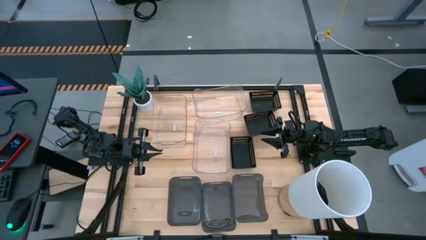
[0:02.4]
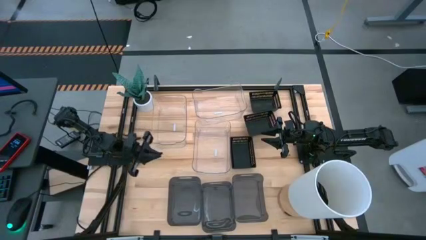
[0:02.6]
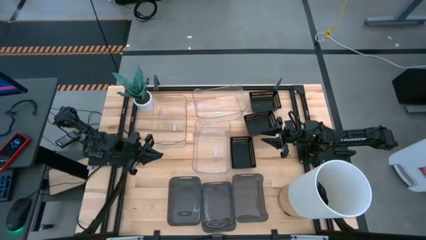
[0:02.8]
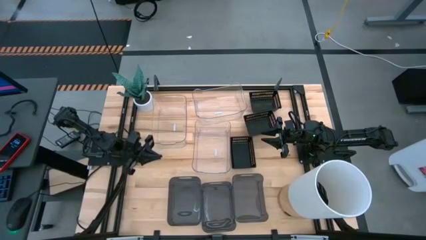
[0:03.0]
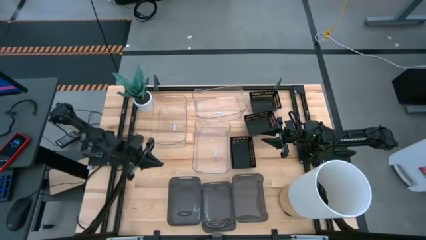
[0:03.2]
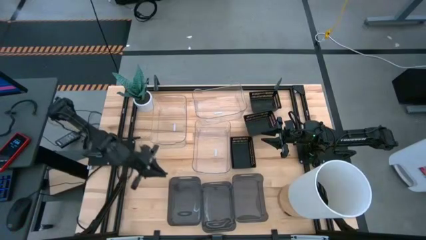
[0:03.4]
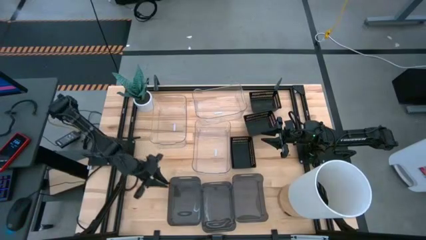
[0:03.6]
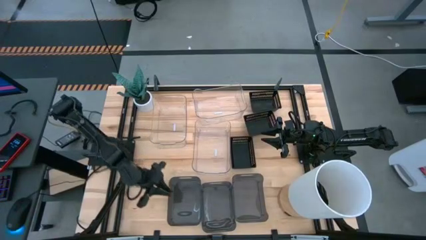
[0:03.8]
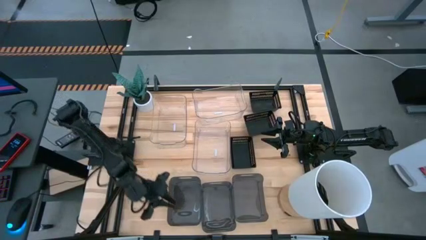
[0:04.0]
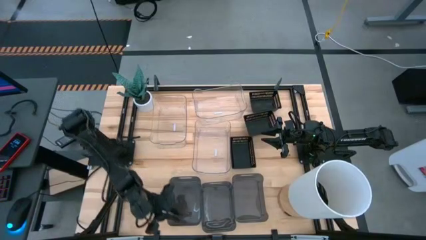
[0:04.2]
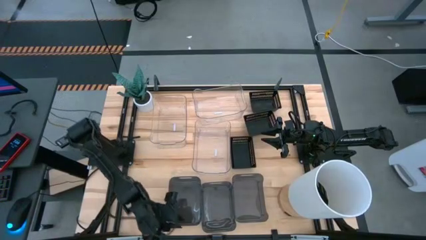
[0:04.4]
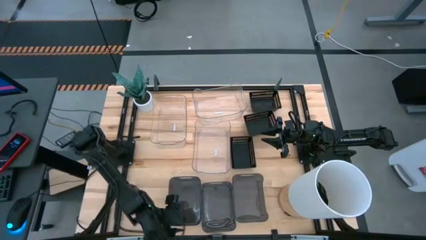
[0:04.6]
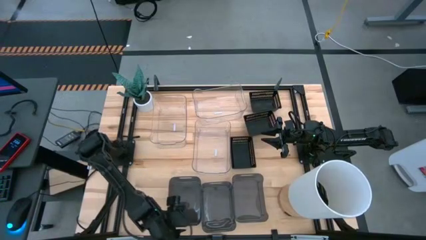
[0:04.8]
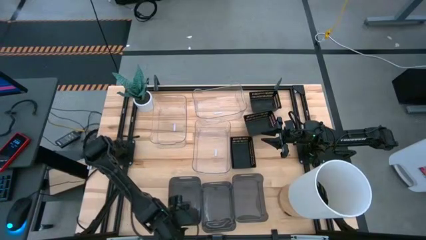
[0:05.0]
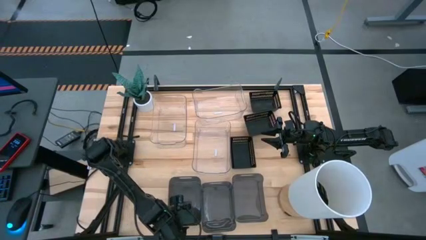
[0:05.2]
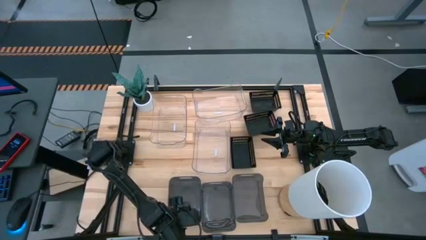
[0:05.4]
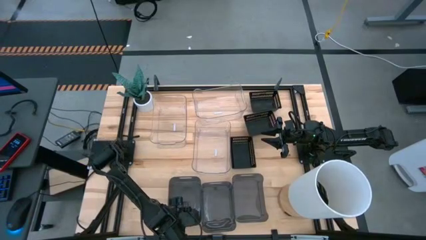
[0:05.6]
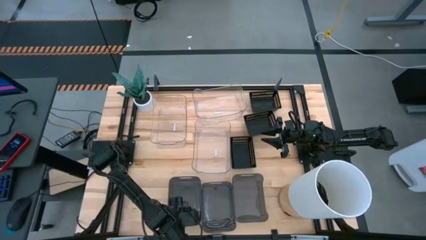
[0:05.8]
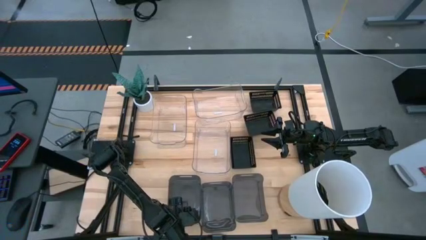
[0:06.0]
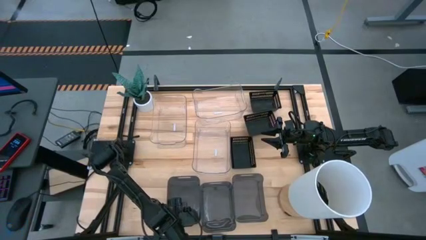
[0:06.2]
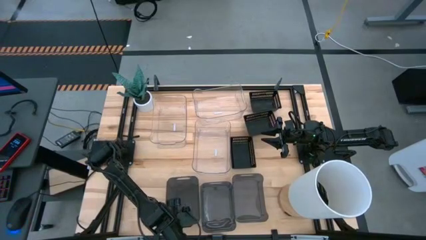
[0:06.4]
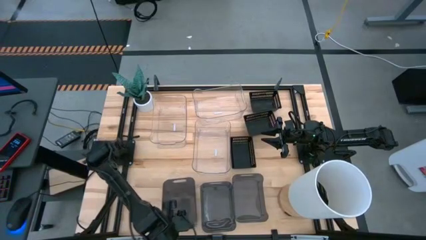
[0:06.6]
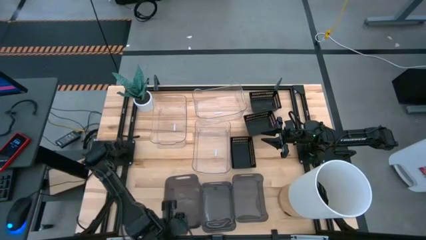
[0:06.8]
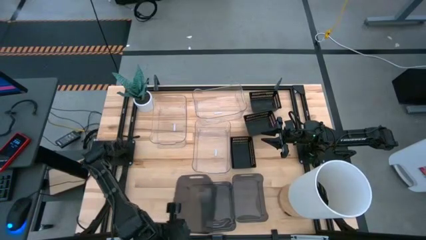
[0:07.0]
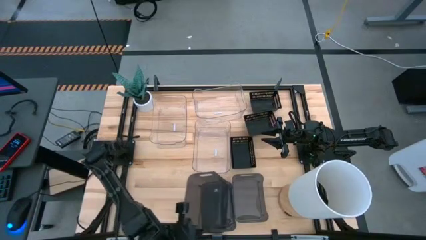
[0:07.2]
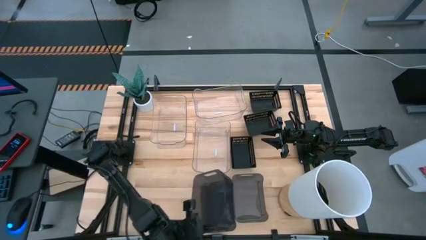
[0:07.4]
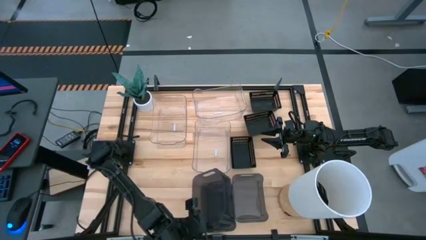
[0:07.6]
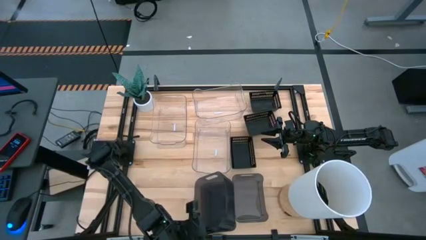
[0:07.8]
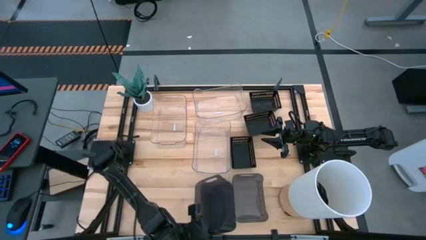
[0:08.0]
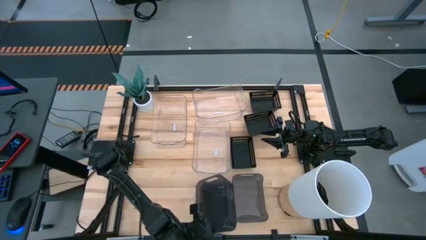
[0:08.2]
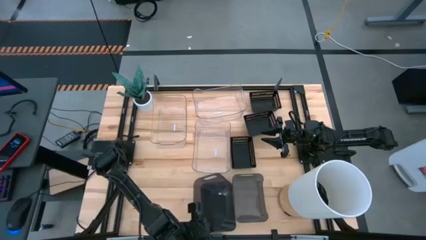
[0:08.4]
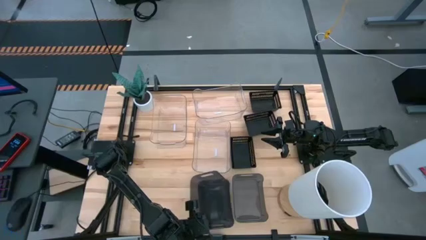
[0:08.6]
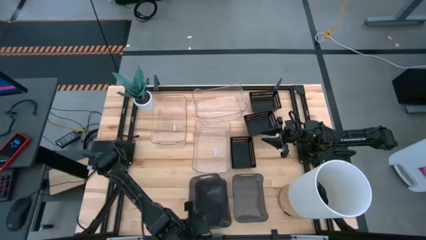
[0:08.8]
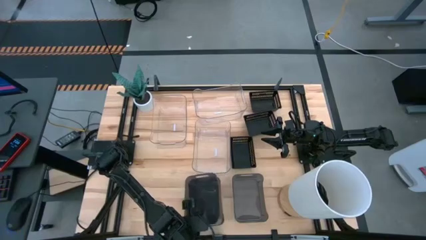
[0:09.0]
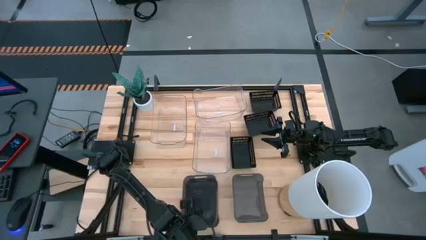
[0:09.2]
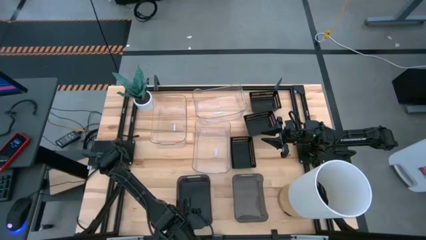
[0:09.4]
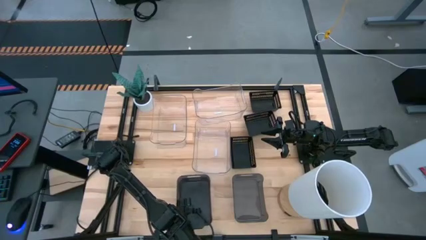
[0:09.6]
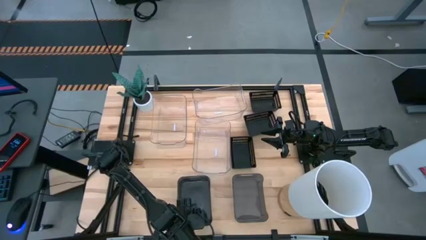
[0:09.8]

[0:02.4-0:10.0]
Stack the left black transparent bin on top of the middle black transparent bin

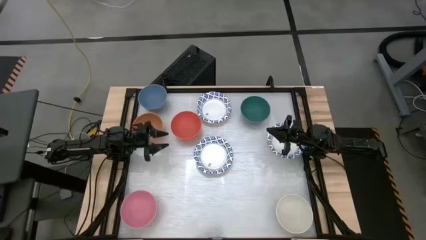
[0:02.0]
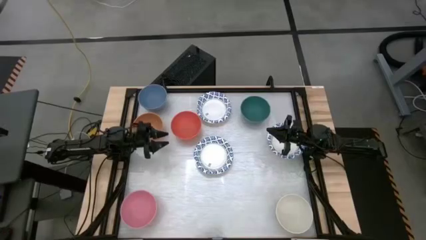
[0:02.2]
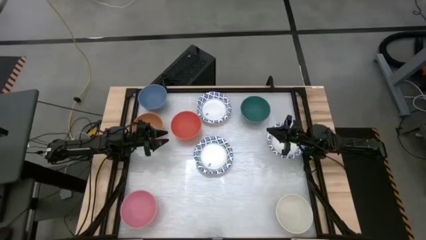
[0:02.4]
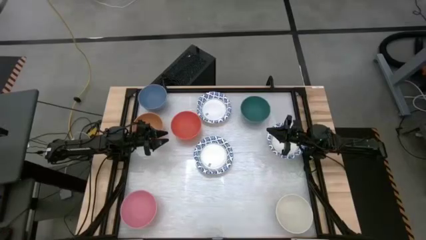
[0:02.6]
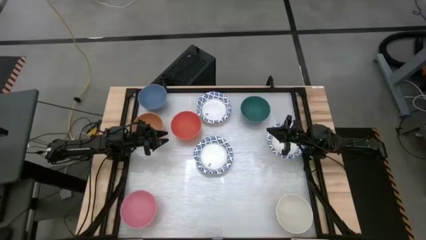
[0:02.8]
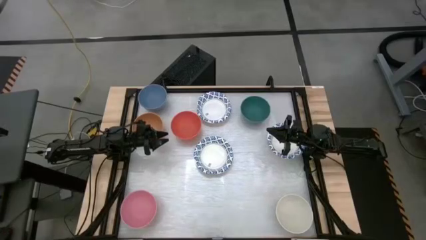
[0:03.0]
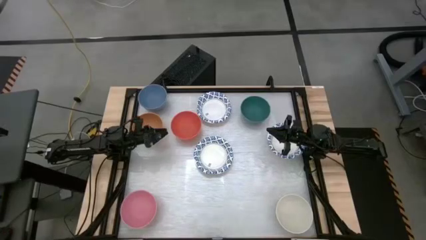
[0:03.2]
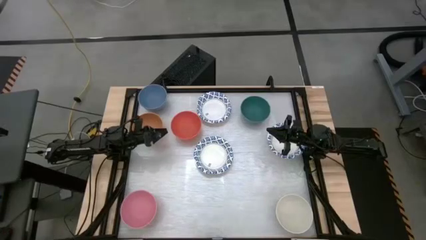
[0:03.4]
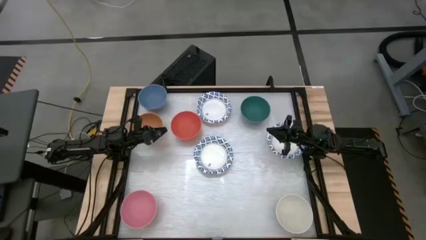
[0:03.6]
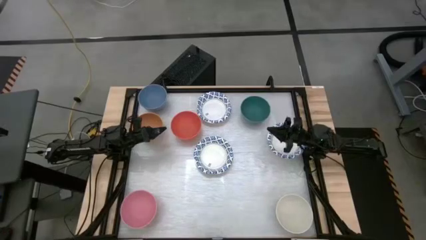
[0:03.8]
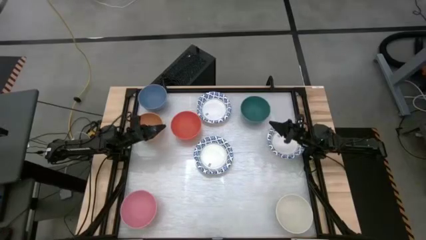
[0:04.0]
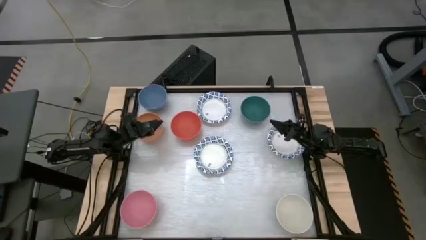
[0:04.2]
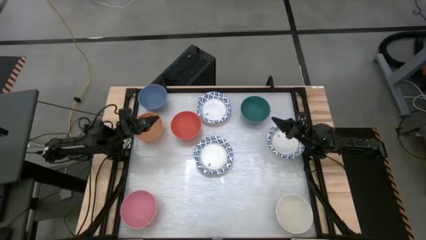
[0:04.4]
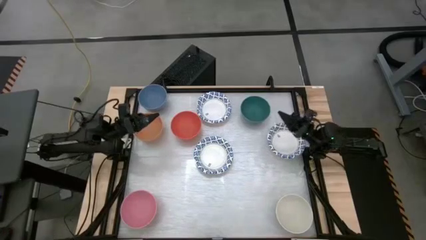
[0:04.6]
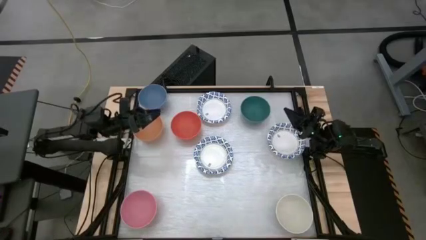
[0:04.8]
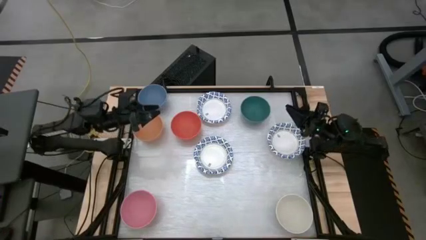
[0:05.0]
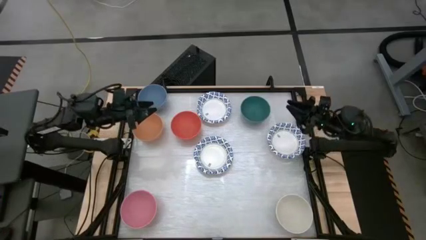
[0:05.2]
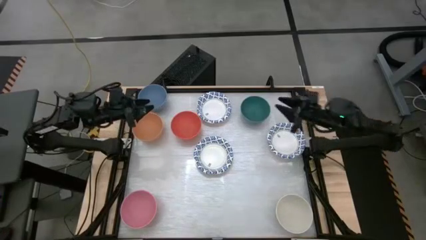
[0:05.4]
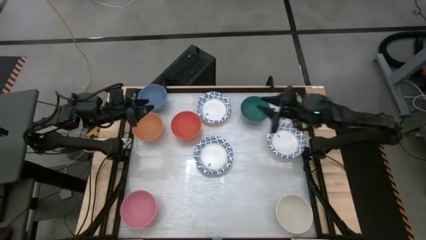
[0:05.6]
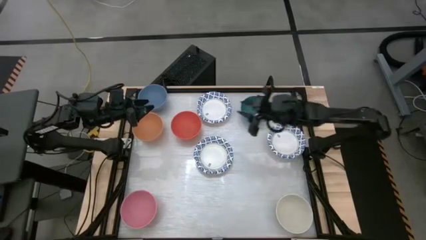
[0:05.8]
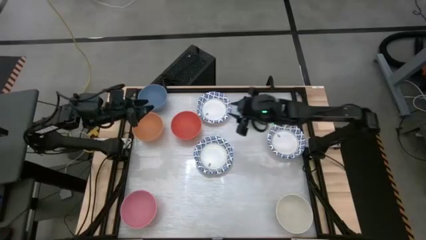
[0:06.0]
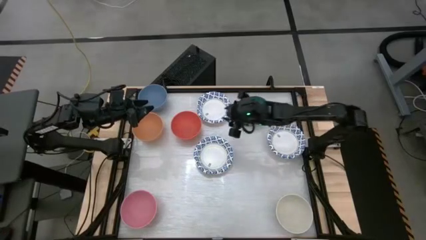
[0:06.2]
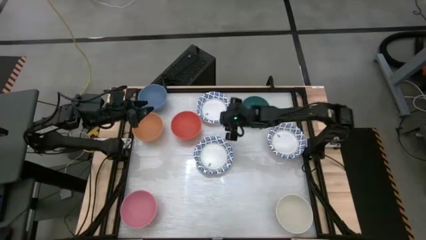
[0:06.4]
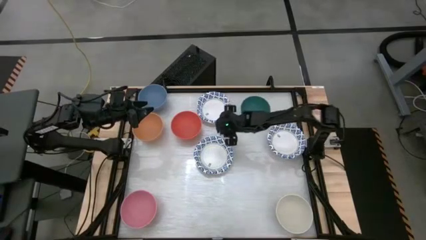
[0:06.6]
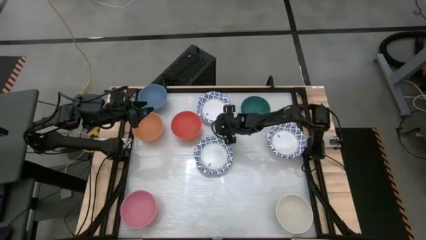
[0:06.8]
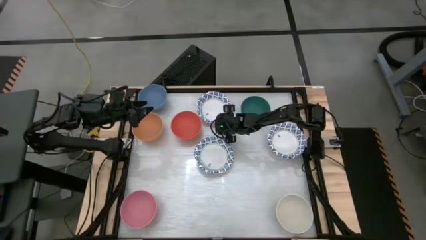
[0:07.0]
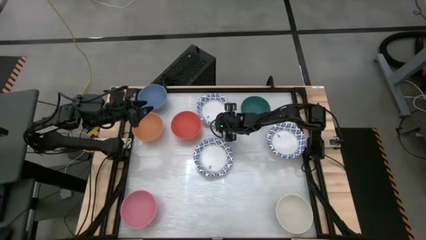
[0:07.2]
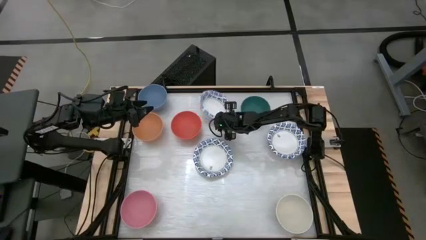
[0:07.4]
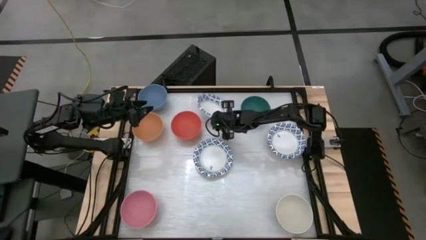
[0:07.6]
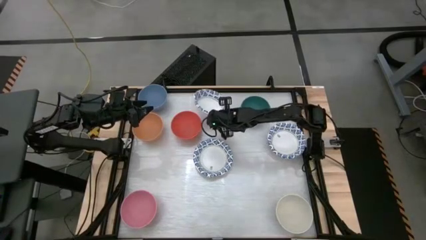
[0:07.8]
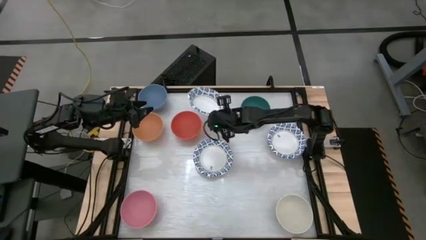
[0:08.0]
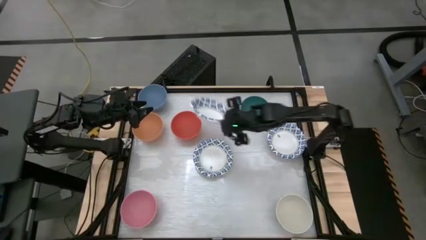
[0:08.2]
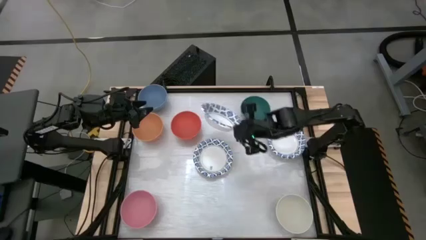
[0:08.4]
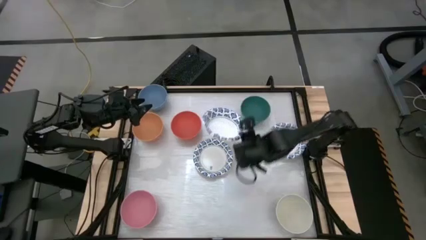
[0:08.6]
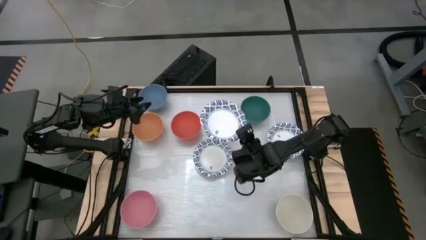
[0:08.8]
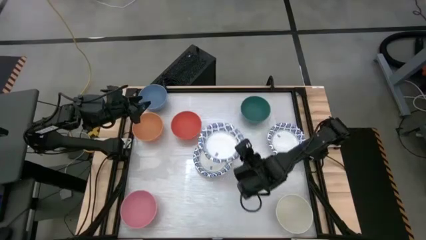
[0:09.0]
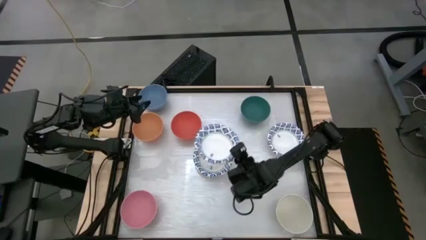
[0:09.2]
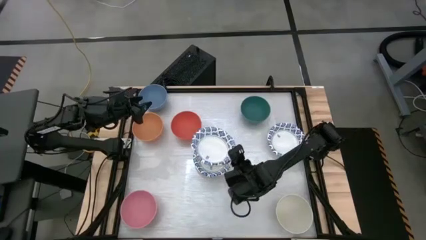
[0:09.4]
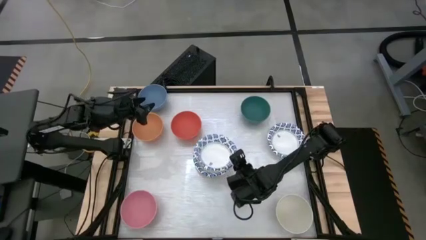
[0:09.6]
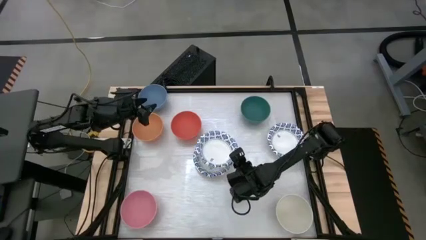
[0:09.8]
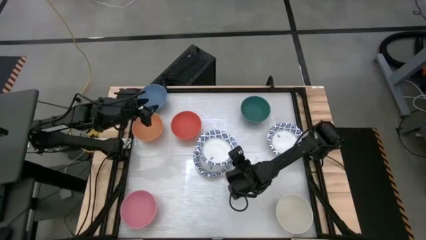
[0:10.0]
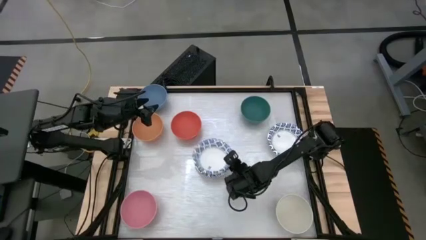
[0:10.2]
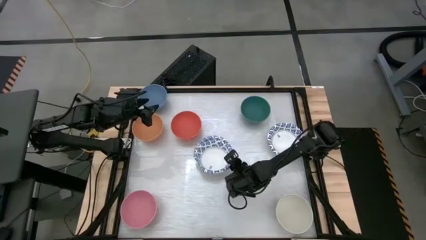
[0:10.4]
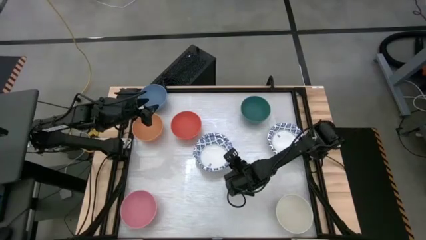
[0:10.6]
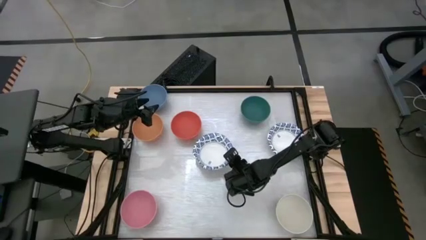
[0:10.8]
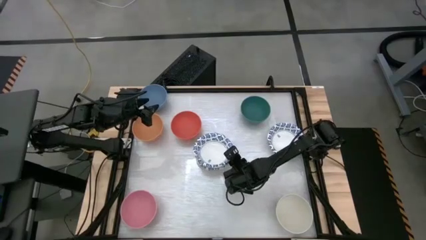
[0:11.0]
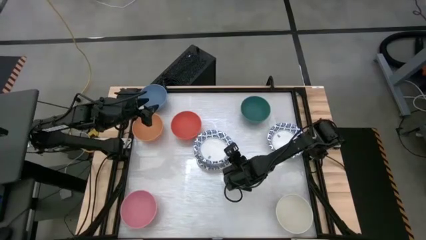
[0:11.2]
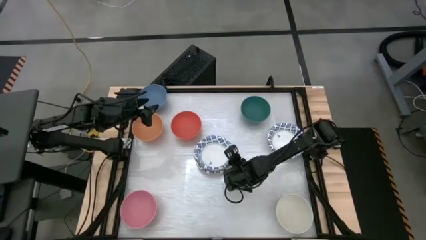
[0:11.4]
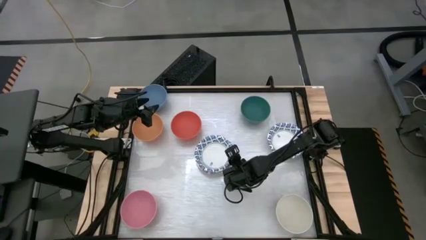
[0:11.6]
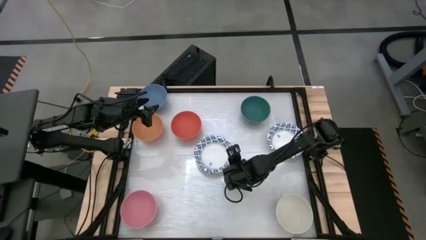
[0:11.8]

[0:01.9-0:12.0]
Stack the white and blue plate on top of the white and blue bowl
